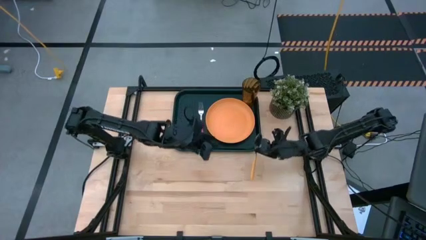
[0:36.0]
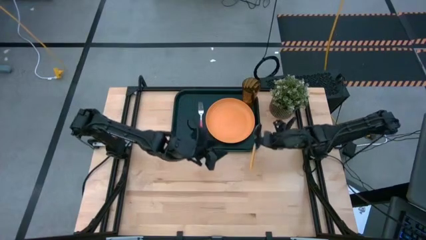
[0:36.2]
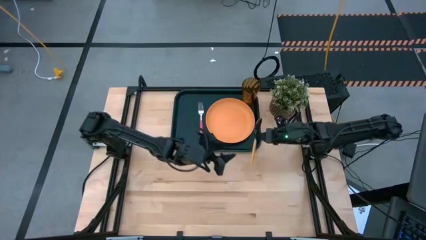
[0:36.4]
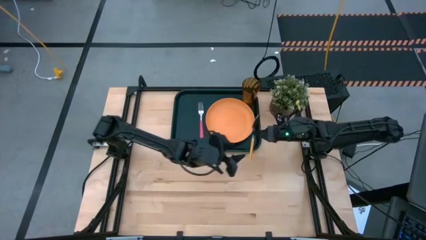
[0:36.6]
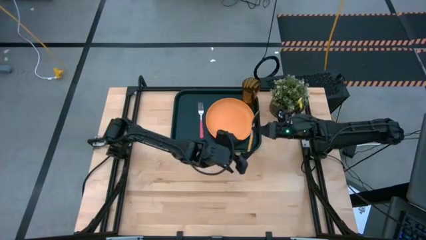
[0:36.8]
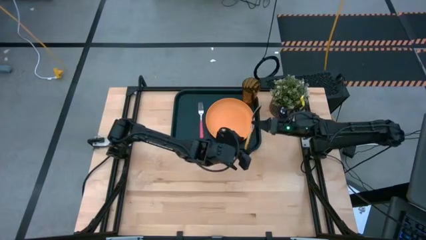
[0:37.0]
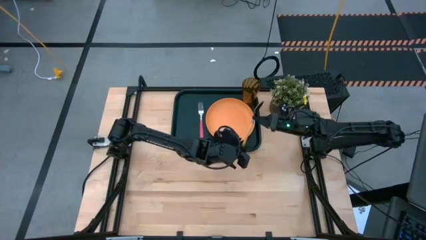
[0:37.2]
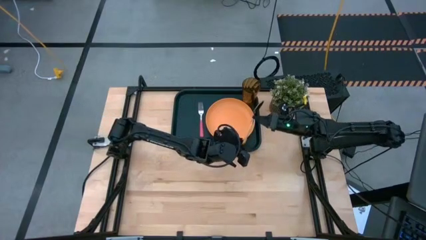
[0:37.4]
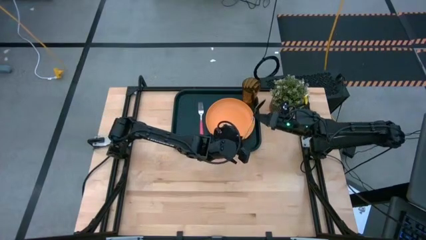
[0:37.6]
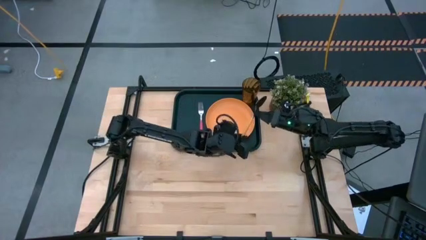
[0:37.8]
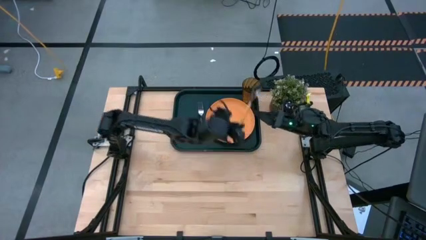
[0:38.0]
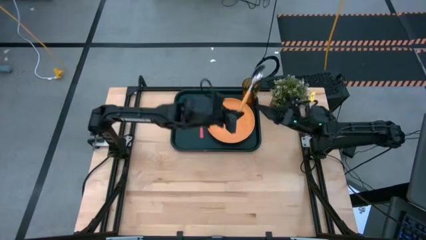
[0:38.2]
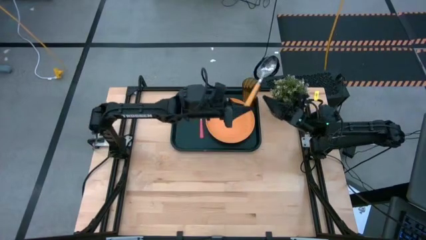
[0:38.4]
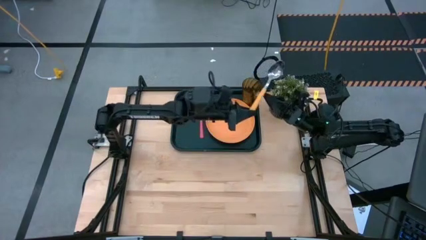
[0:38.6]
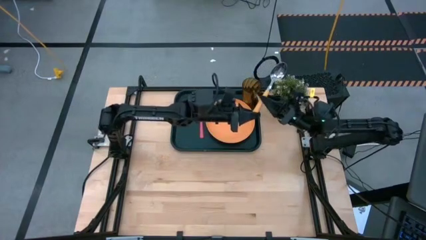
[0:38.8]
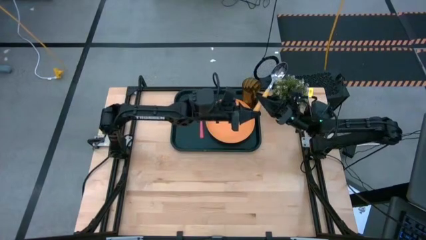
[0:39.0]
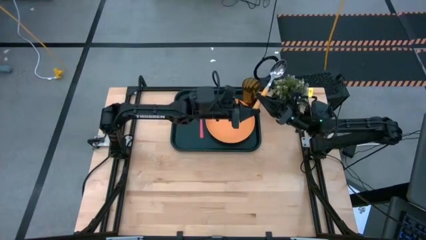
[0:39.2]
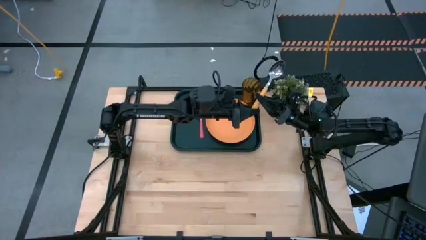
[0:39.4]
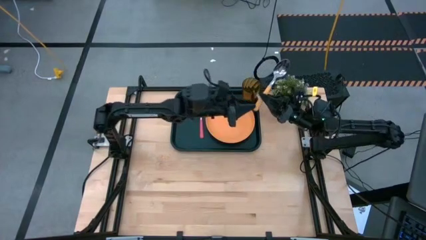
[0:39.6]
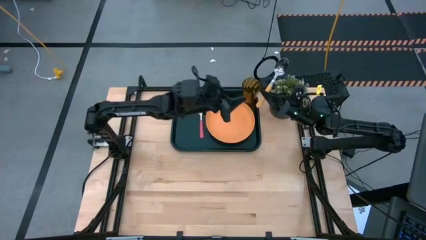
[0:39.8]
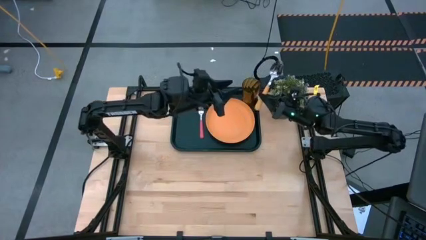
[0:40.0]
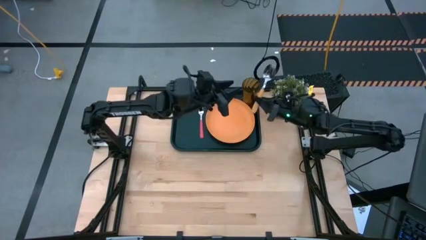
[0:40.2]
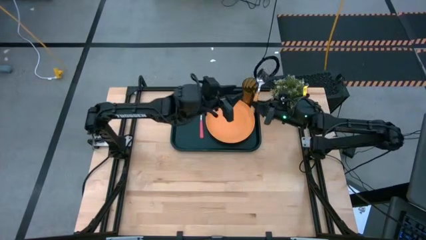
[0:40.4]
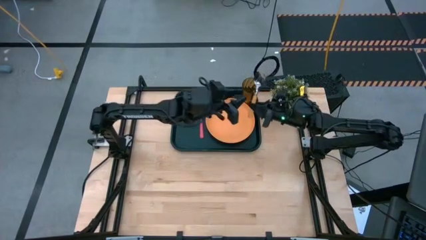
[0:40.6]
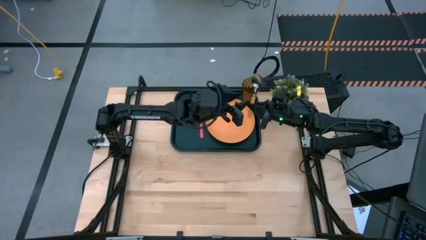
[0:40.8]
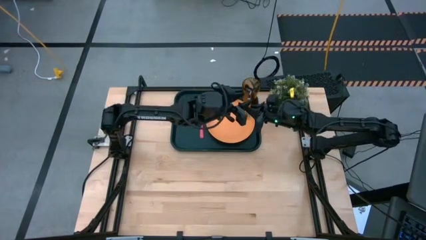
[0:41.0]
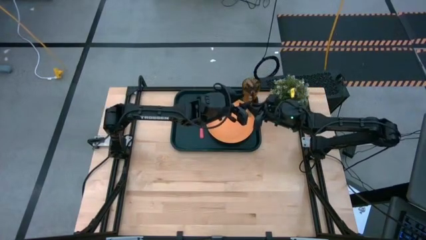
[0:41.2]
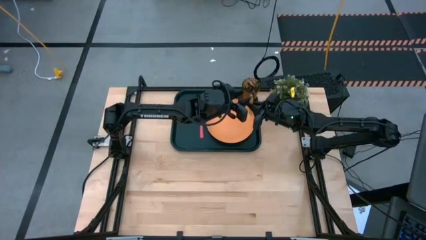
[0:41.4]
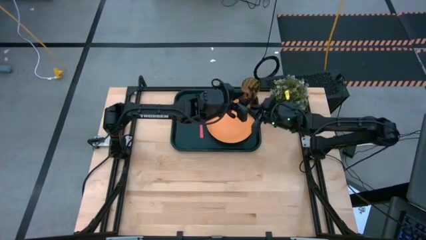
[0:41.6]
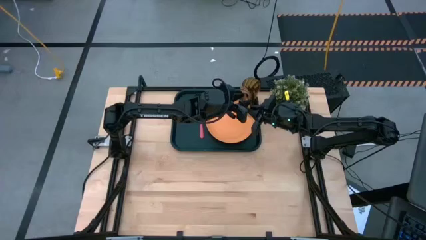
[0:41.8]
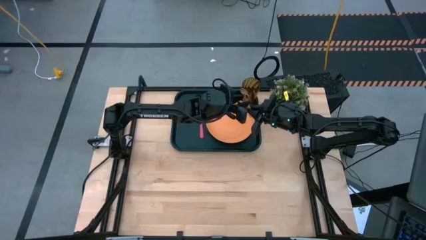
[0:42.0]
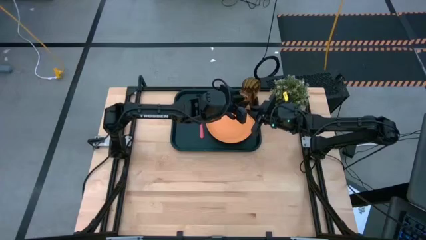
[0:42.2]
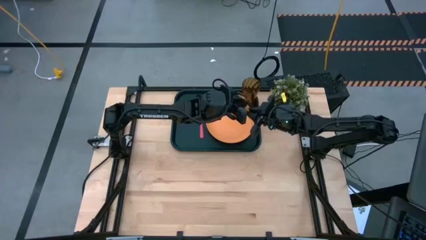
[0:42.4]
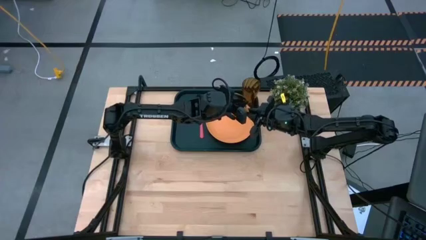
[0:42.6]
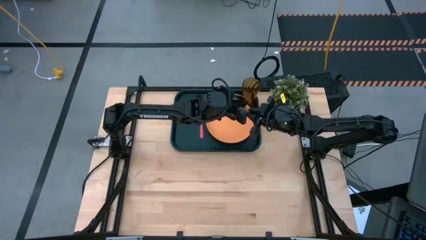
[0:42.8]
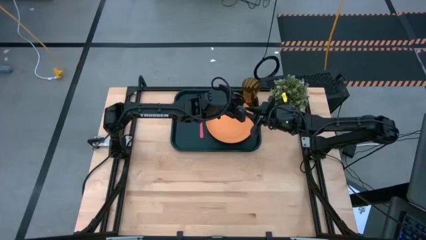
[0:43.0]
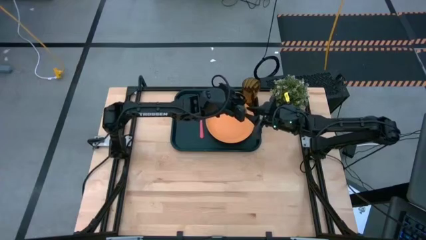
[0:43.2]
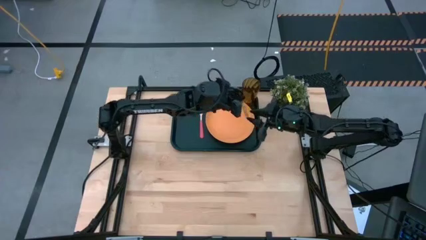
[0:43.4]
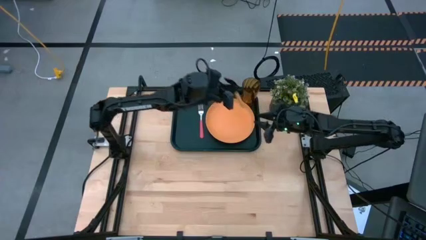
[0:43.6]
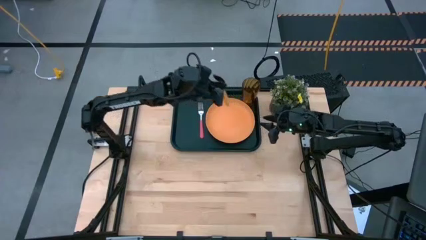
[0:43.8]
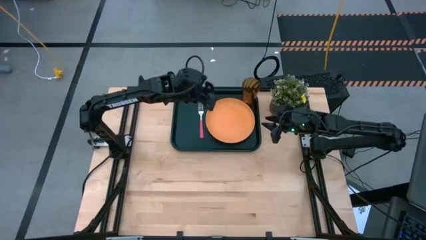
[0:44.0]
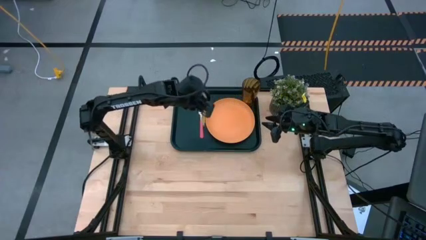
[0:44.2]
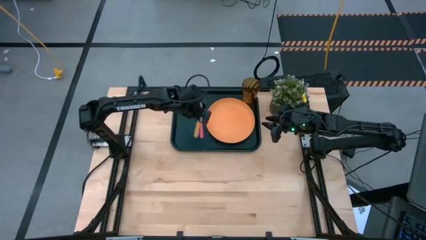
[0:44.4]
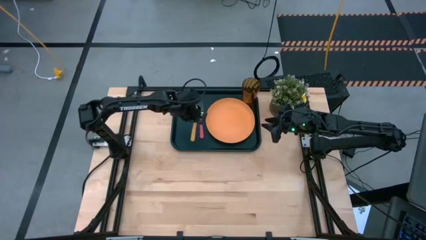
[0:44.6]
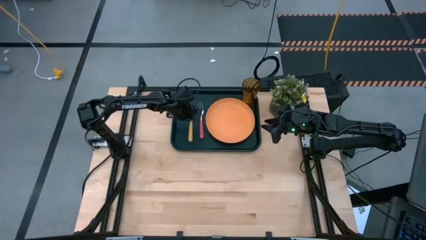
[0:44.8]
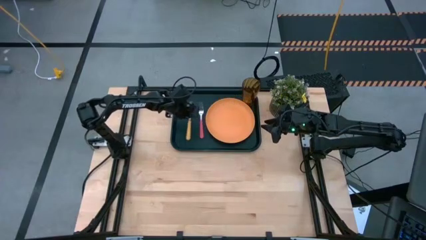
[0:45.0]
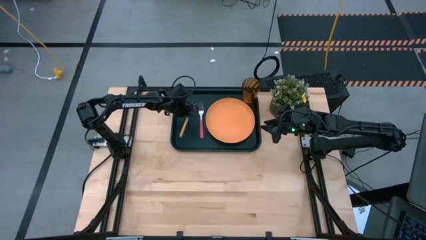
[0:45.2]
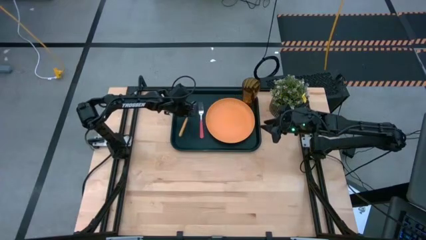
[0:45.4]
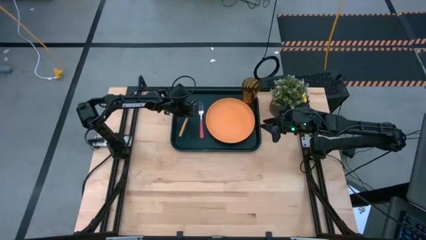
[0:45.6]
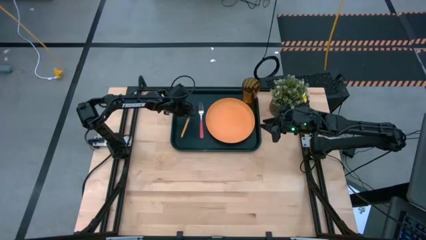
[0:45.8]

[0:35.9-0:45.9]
Task: Pick and place plate/cup/fork/spoon on tray
Put the orange spoon to the left of the pink fork on the black tray

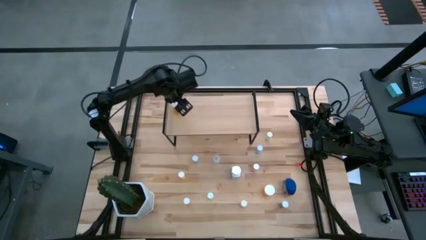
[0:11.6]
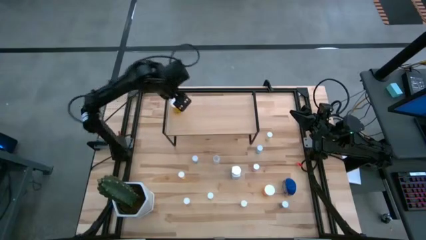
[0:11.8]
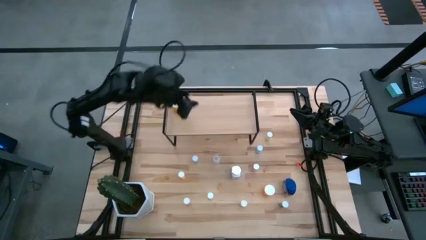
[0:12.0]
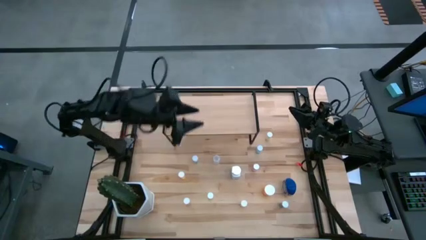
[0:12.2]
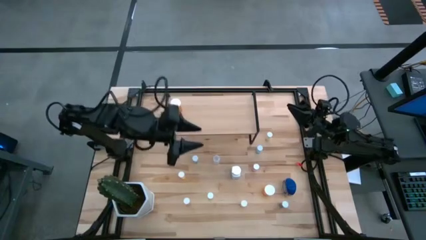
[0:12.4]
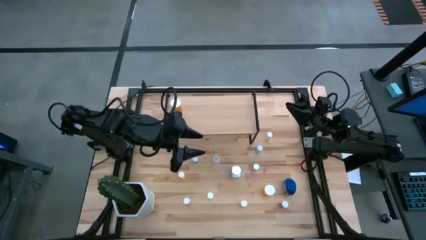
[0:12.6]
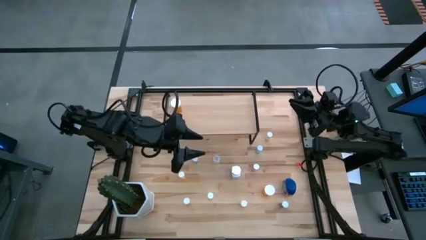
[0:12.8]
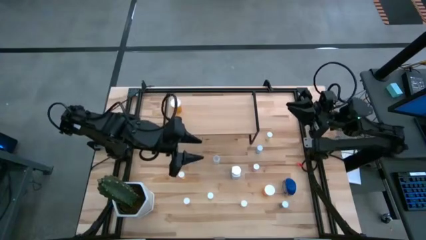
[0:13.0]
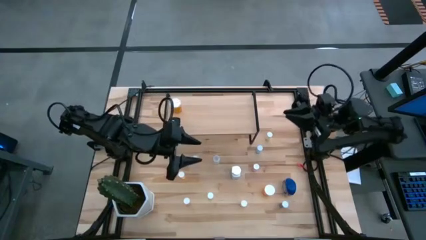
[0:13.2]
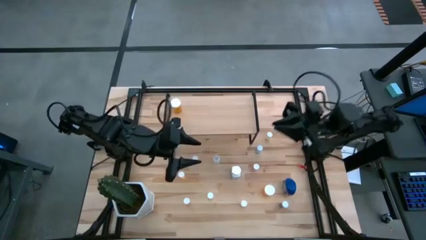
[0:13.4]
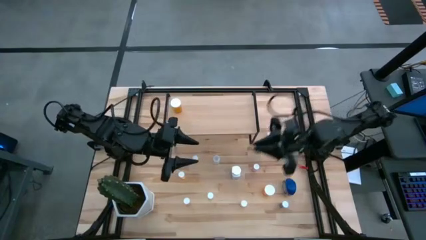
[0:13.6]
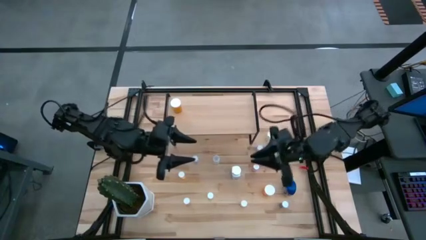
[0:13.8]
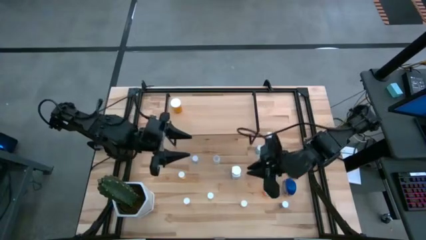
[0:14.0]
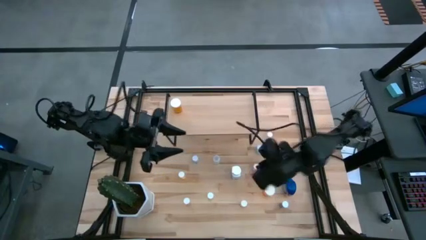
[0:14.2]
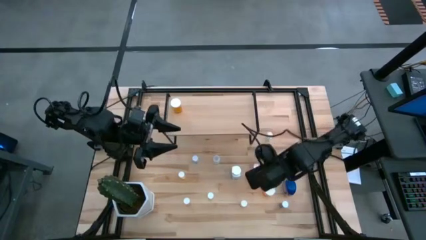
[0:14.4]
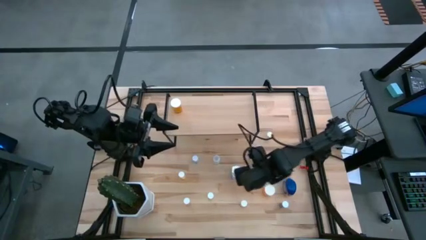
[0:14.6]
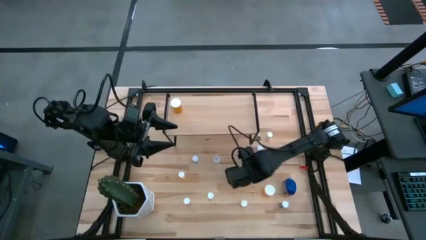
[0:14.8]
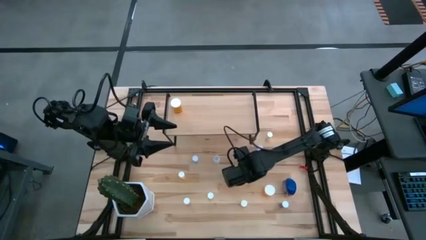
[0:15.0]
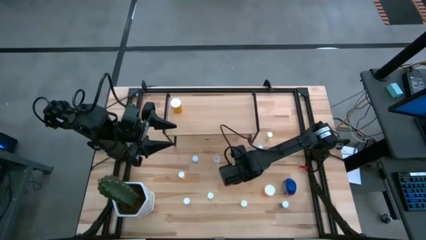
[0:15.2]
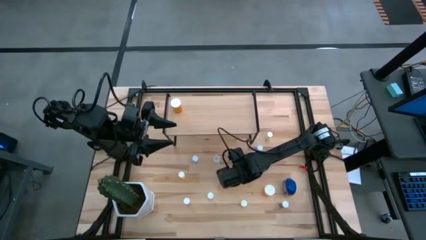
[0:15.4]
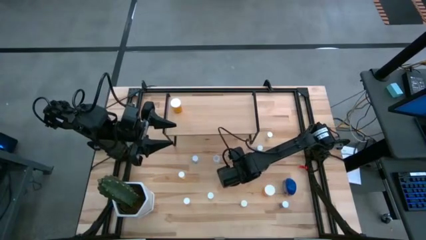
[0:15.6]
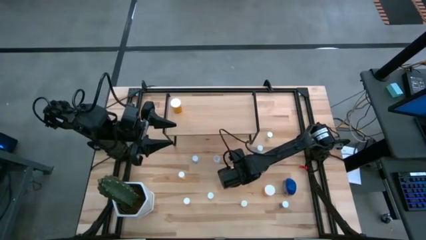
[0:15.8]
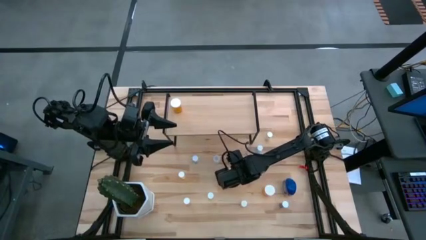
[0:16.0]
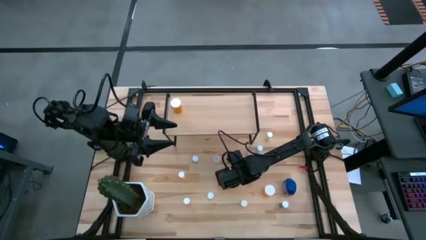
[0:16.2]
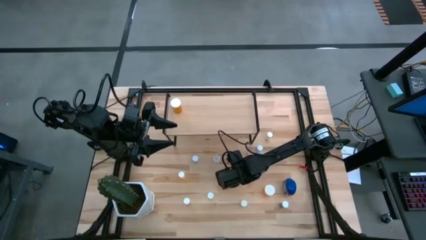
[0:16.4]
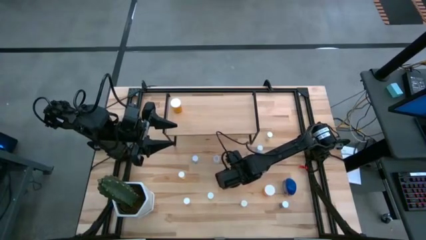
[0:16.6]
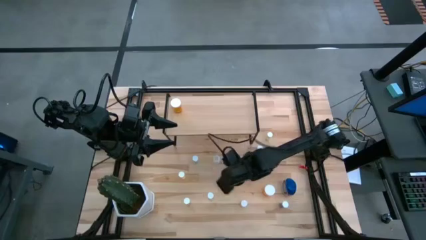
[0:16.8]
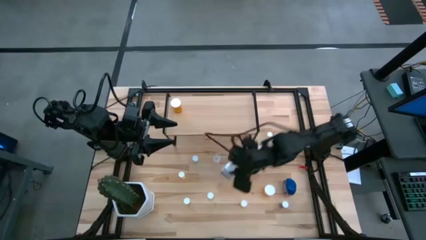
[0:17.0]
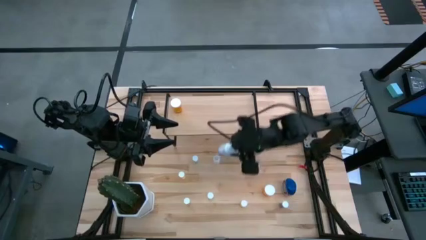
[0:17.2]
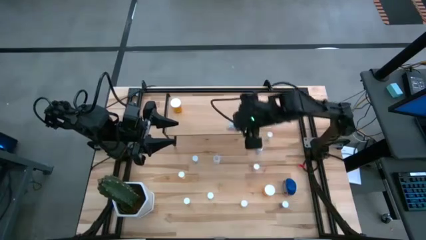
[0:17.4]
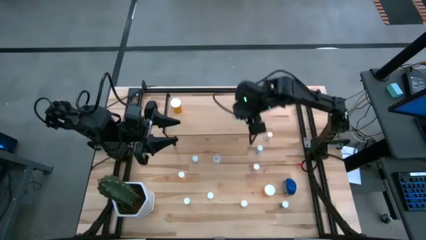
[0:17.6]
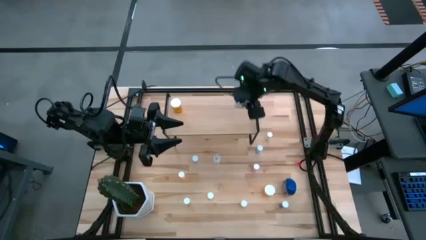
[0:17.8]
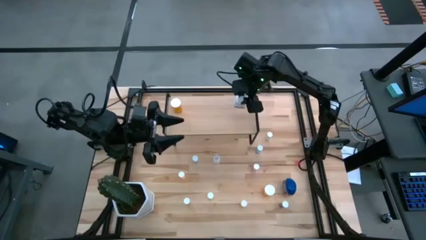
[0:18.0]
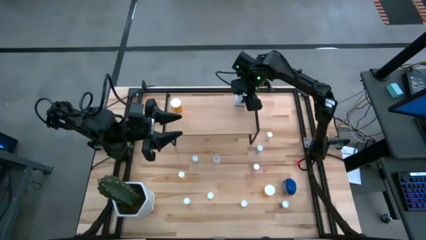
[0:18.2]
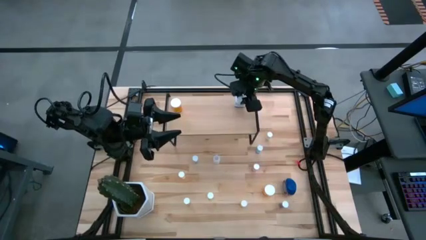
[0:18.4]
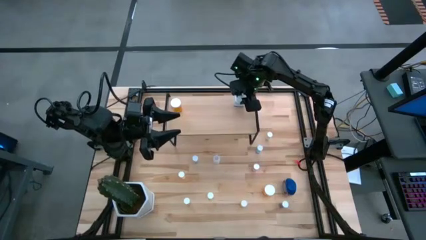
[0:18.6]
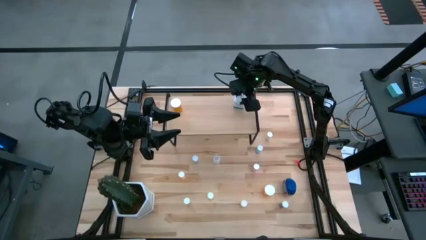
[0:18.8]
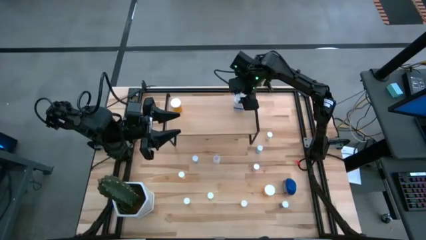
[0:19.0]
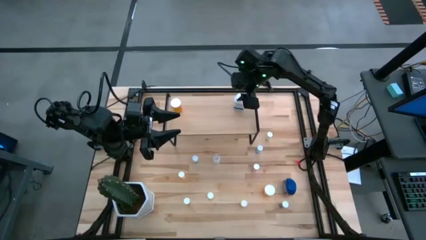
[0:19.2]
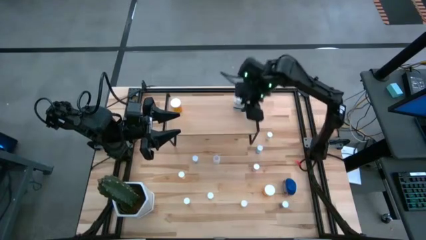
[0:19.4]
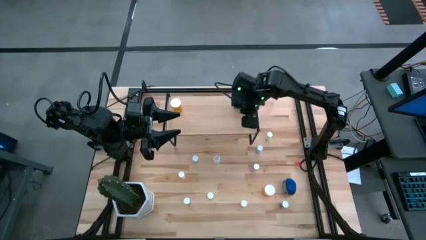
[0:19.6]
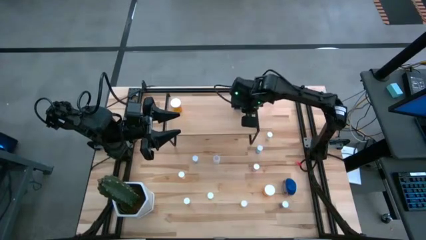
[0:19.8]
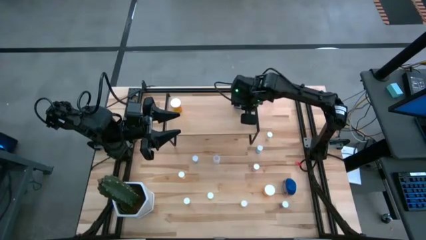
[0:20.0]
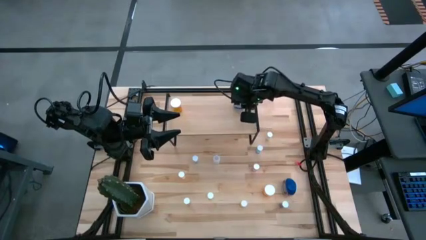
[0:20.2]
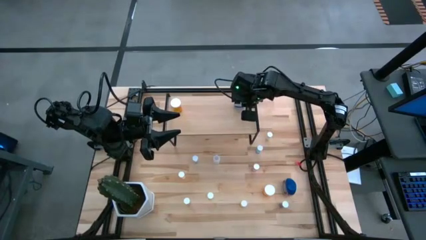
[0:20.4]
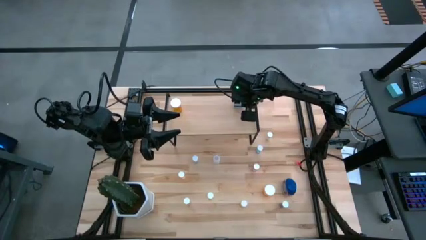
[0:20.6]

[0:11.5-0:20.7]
Task: Pick and place medicine bottles onto shelf by color
Put the white pill bottle on the shelf
